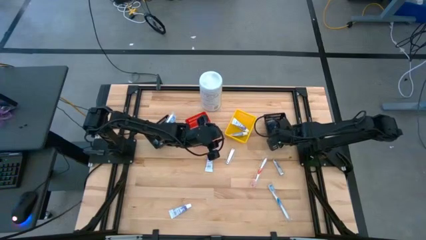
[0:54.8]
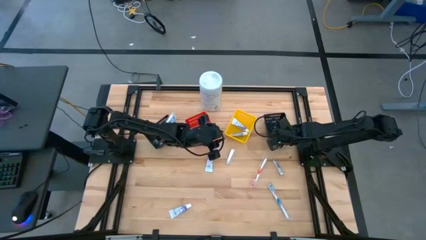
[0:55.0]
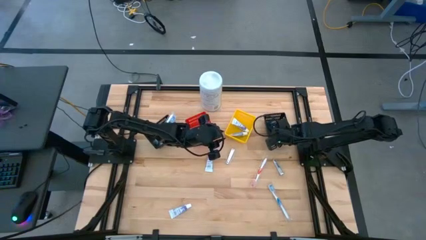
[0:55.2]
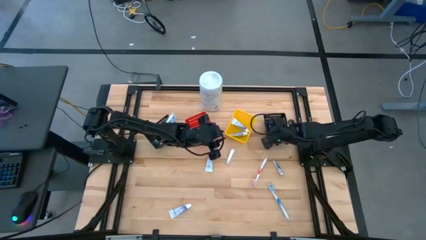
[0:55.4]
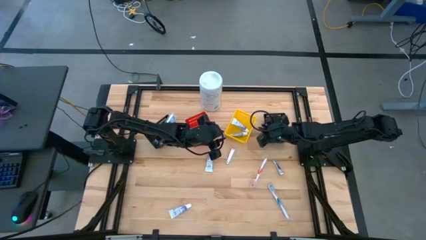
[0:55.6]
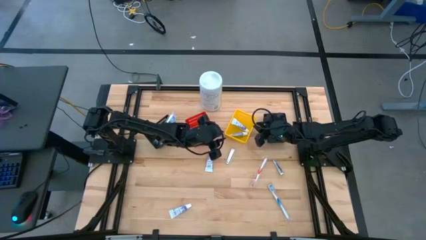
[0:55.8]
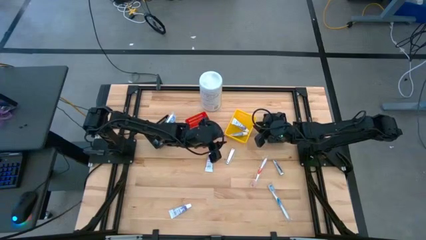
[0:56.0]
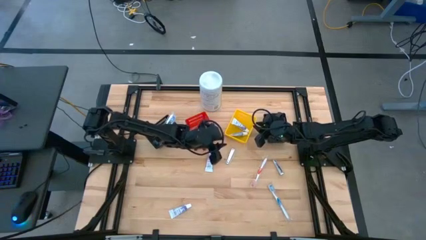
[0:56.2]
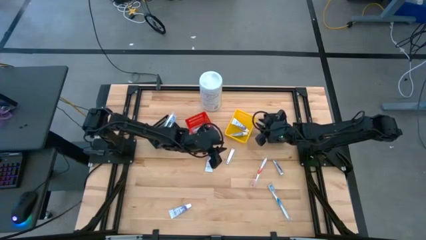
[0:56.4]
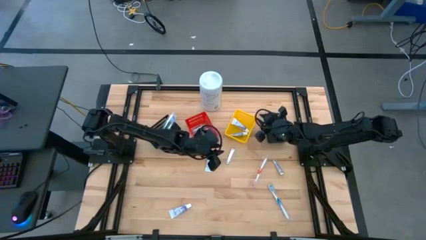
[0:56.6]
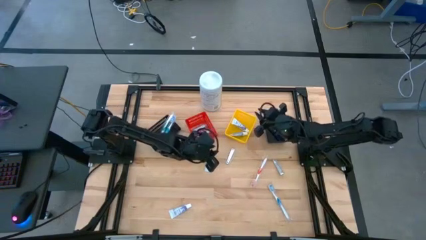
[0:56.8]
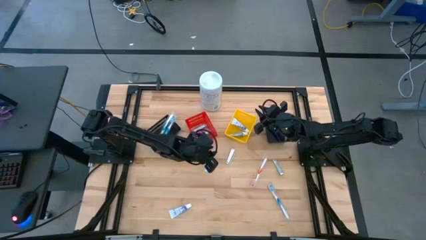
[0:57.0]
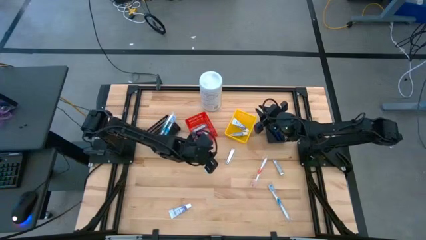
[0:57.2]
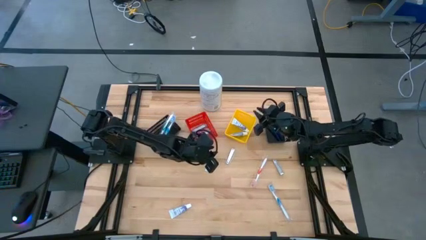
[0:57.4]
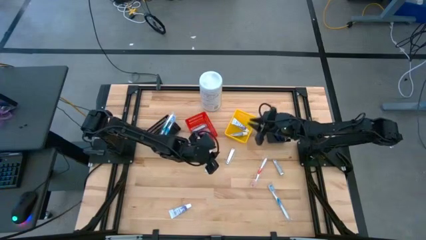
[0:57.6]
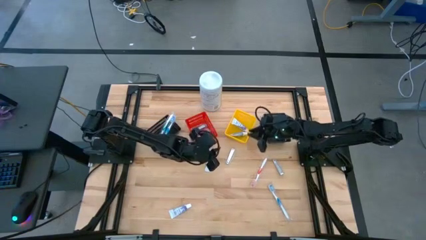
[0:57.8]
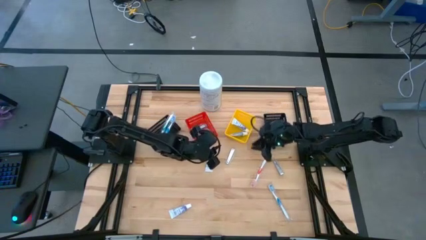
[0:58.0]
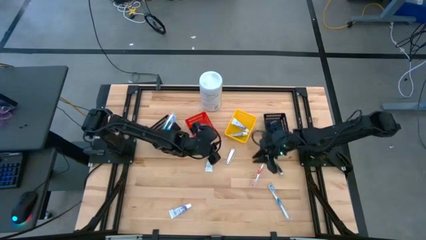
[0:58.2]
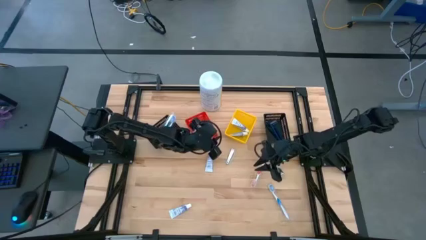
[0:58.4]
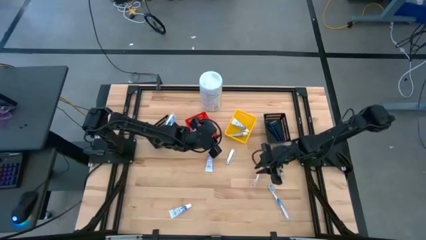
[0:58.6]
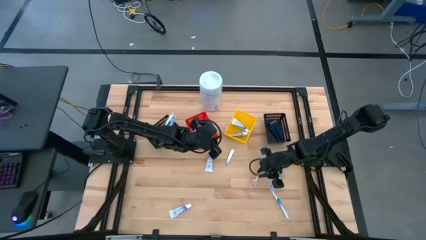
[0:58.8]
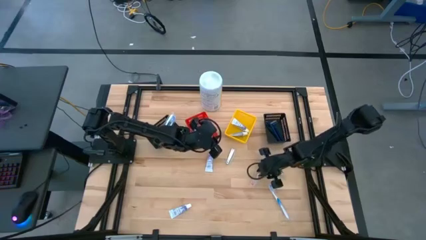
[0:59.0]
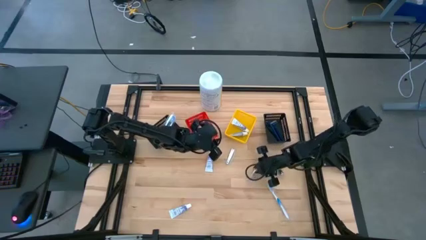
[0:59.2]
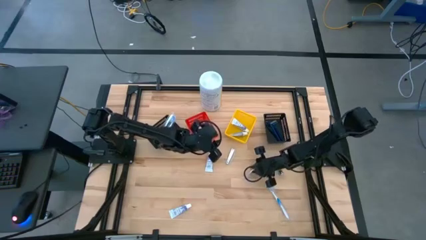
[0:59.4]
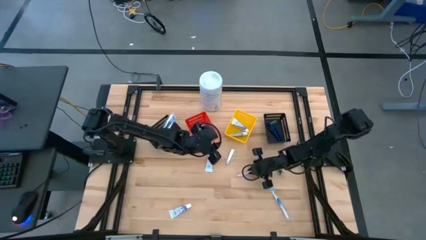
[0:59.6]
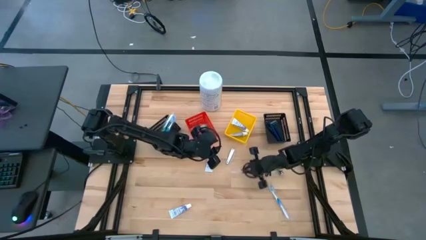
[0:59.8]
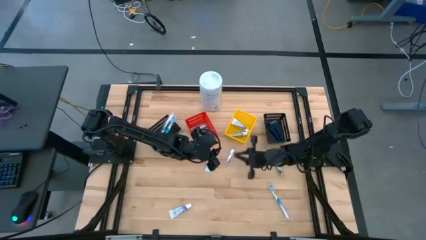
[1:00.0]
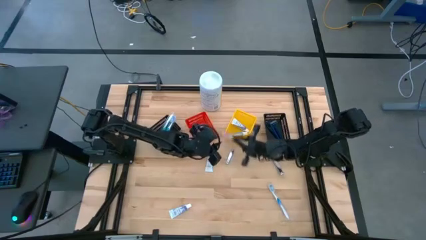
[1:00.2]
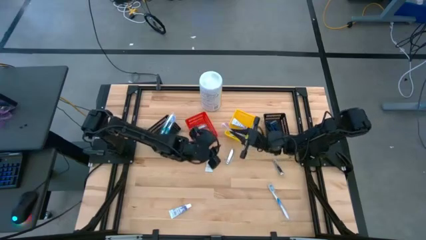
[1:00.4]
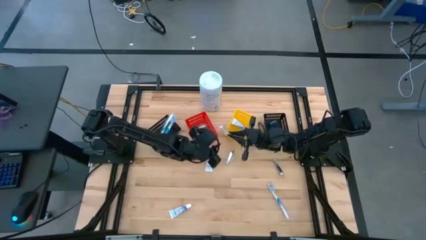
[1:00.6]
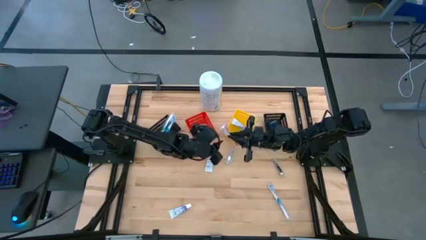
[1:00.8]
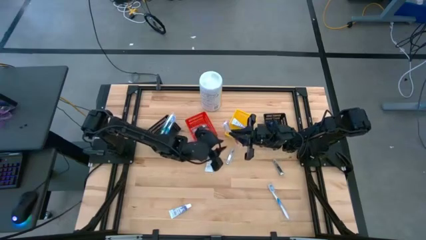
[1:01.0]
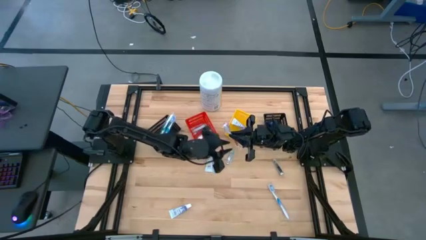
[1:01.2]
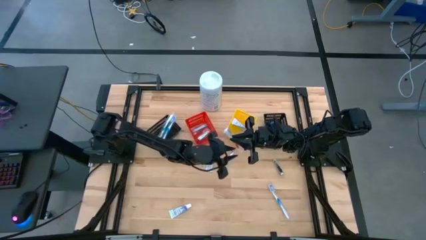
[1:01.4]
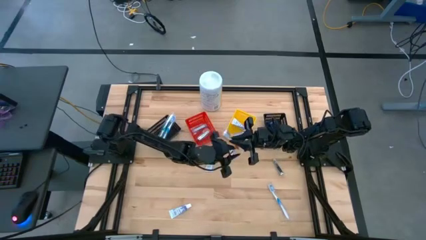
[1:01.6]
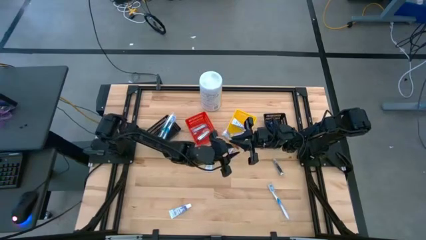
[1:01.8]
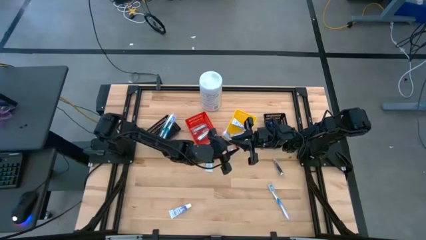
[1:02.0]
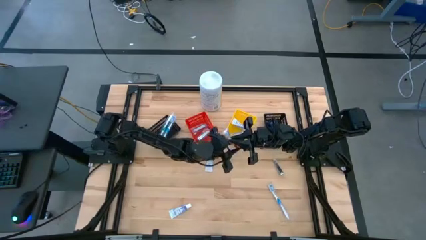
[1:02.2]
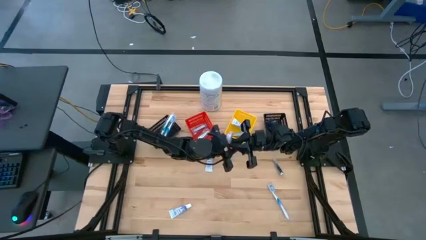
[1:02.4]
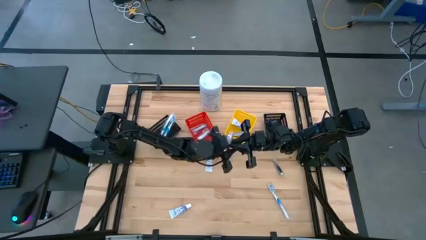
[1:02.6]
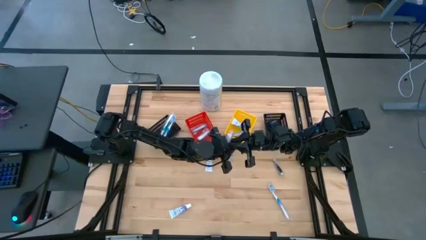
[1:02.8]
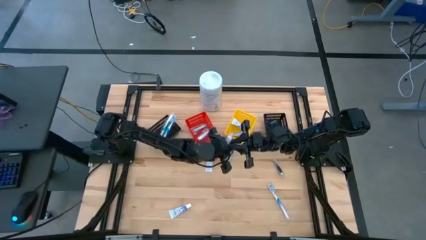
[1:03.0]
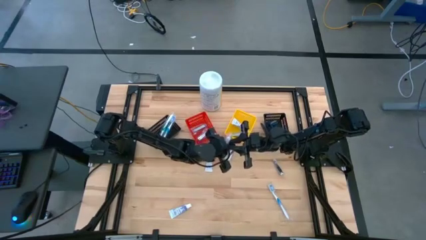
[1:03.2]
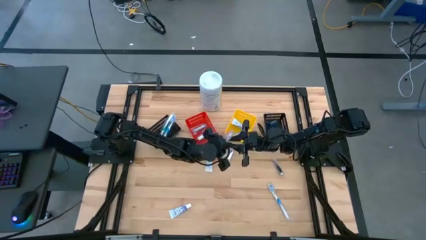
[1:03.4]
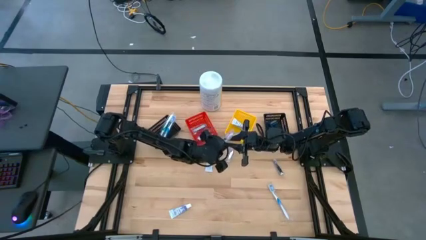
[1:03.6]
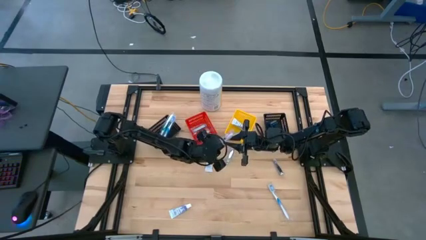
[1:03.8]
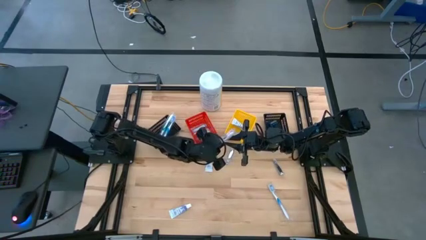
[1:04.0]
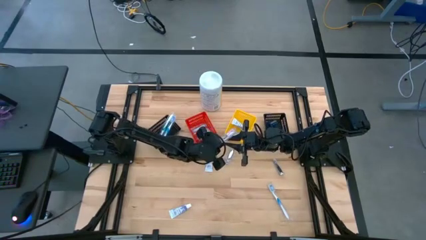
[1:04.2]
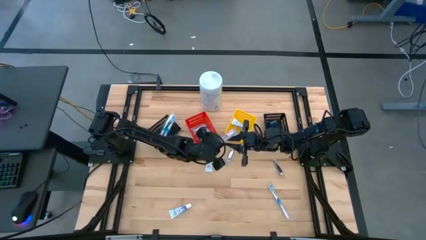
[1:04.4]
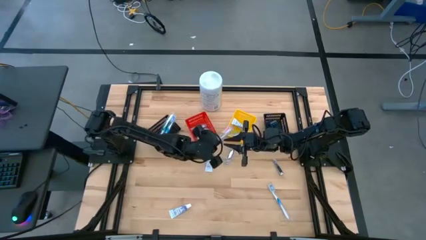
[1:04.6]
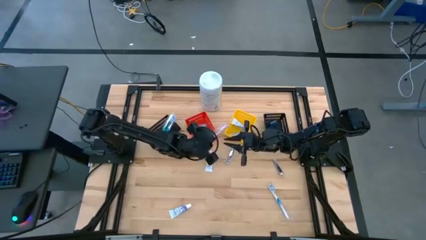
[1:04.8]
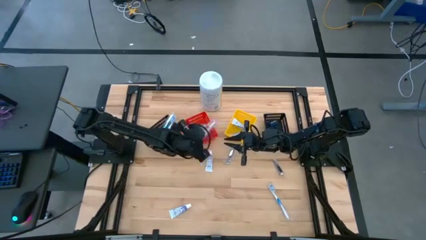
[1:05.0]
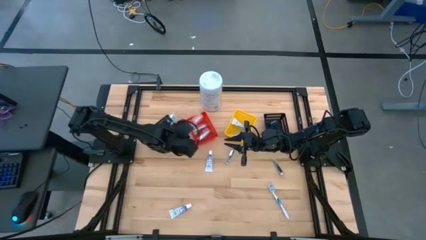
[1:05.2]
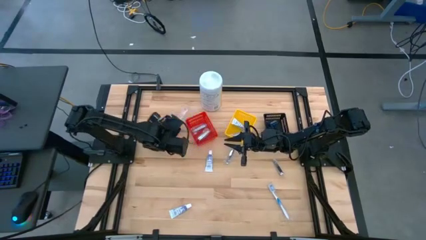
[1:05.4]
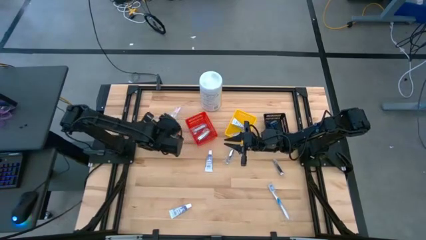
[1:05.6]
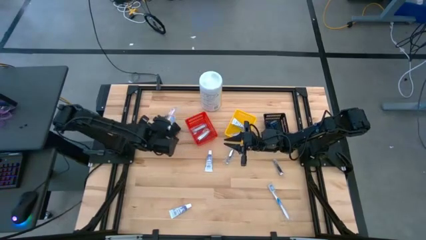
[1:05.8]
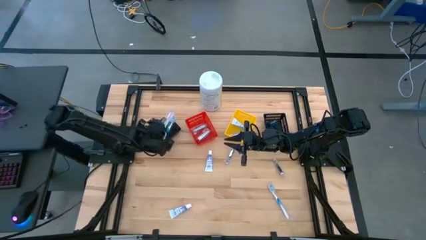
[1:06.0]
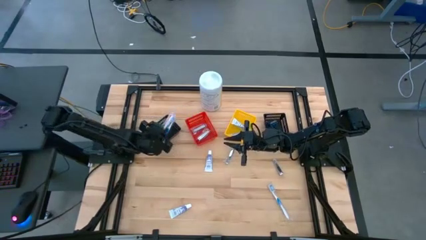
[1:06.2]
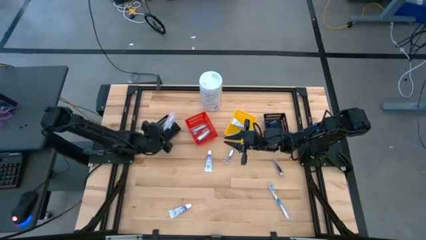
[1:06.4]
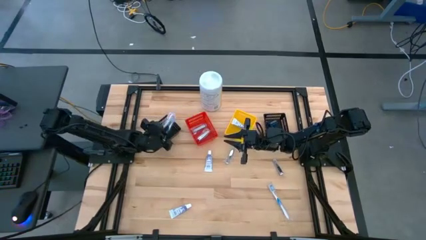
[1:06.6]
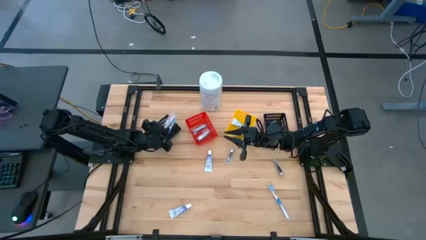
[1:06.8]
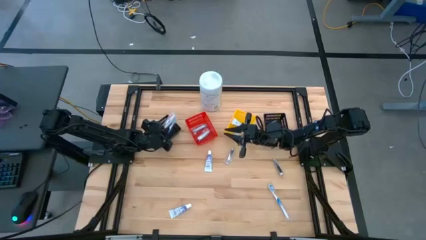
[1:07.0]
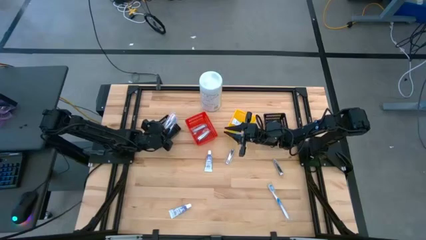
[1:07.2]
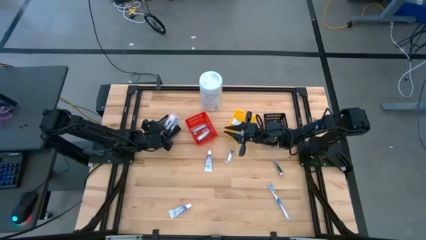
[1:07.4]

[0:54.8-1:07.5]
Task: Pick & Place Travel size toiletries
Put the red toothbrush into the left black basket

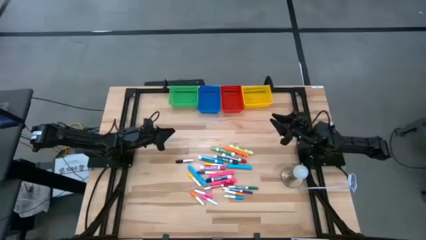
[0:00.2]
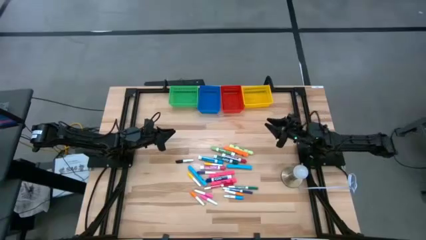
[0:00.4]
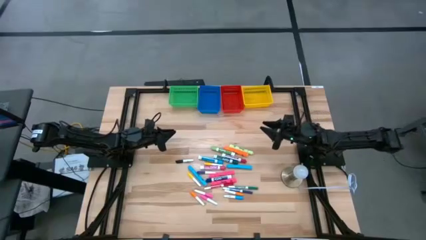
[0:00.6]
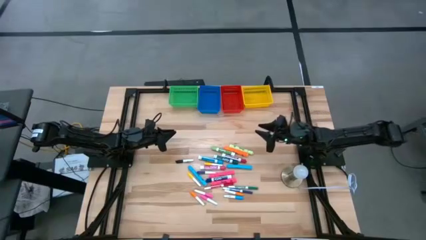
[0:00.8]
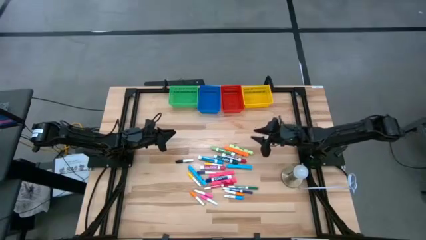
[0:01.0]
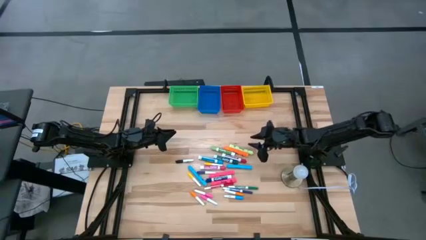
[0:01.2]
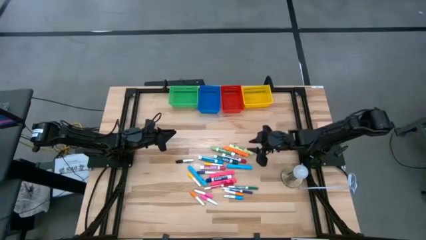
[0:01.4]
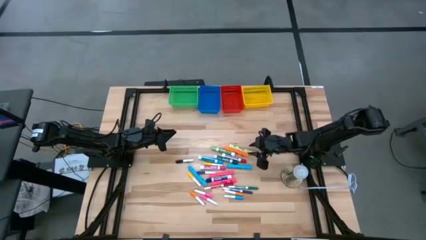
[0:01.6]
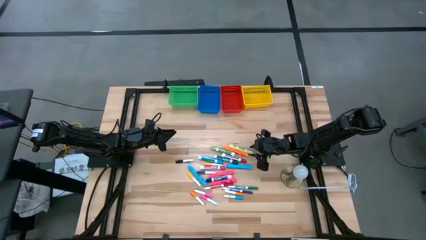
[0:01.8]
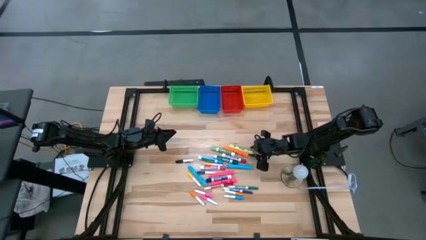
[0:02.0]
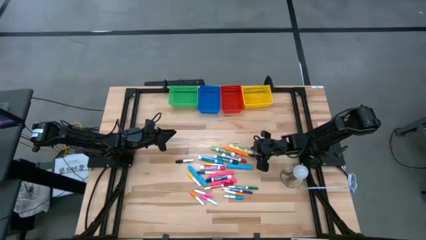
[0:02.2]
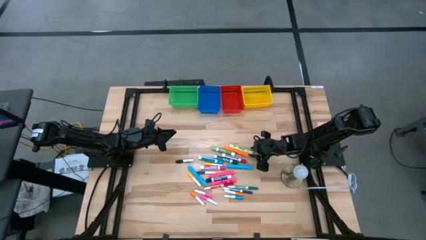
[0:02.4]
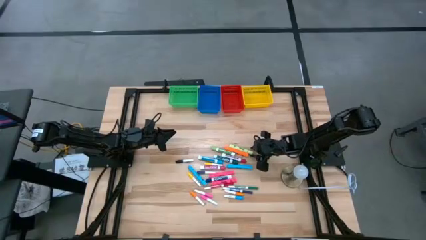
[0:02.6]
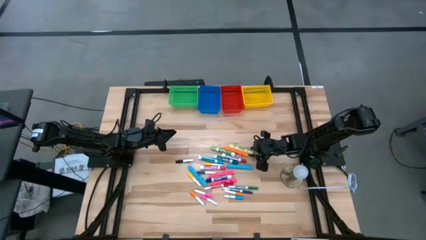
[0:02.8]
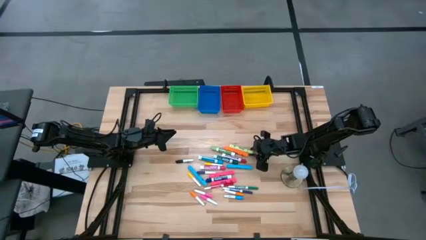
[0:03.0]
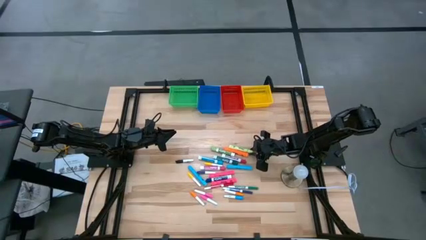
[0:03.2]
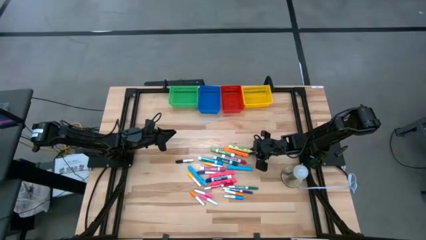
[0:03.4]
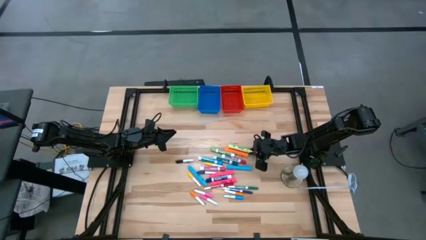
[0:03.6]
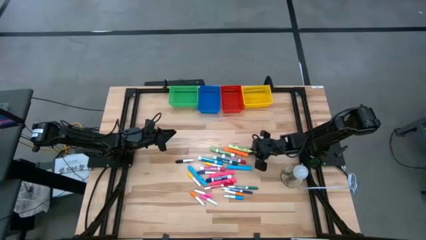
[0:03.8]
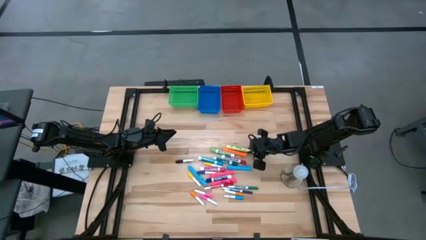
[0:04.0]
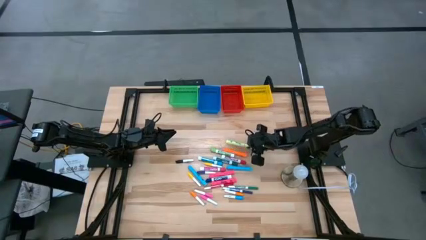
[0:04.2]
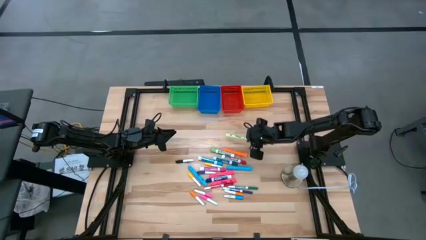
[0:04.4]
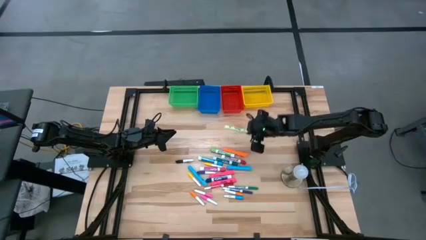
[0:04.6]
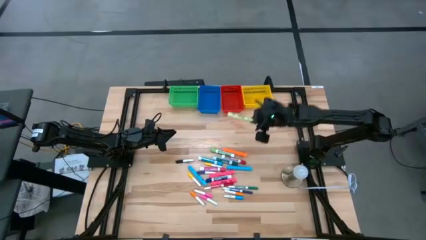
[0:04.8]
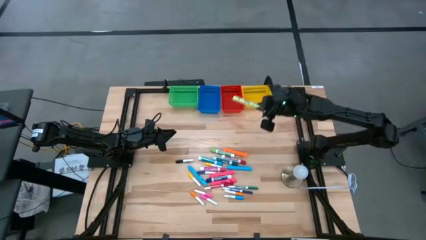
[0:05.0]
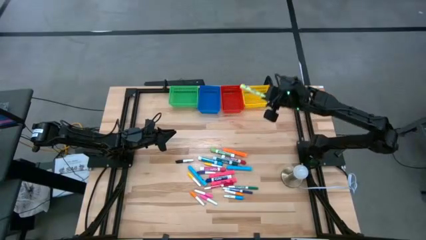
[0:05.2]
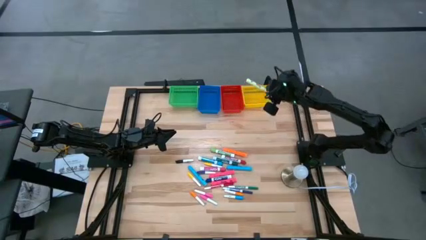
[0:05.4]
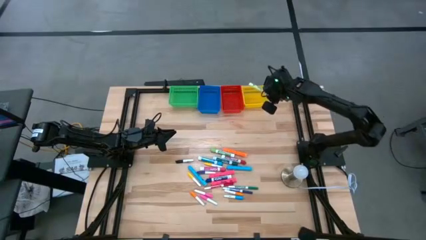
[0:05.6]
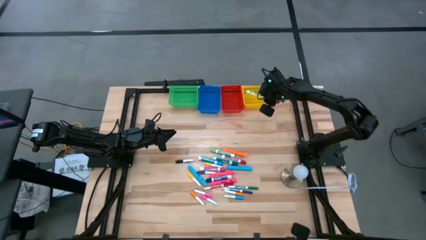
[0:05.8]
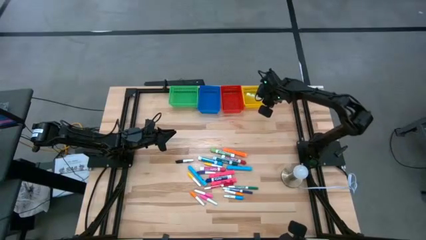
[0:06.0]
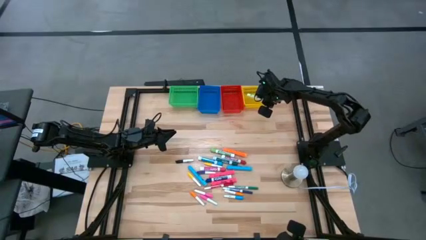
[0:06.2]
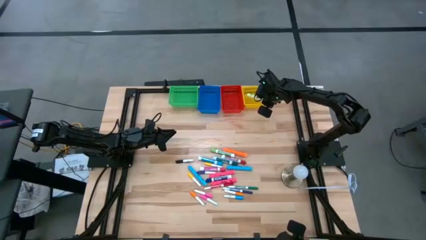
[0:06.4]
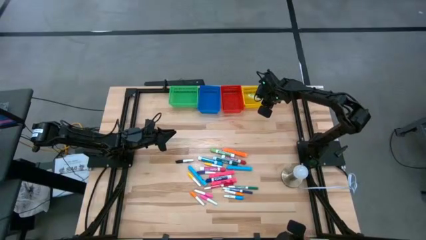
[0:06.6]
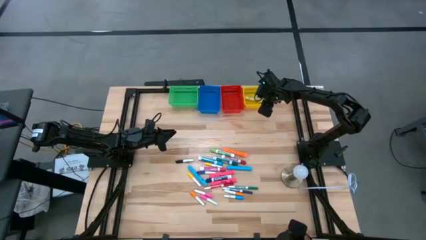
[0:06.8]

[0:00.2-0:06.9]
Task: Pick & Place Markers
Put the large light green highlighter pen into the yellow bin
